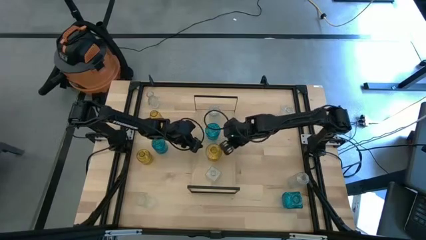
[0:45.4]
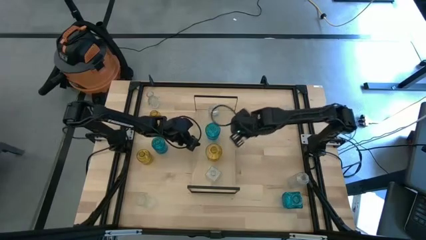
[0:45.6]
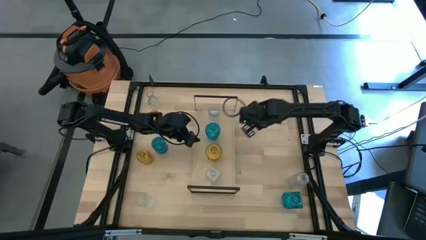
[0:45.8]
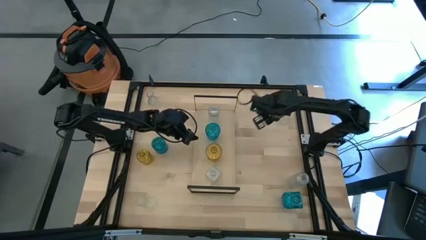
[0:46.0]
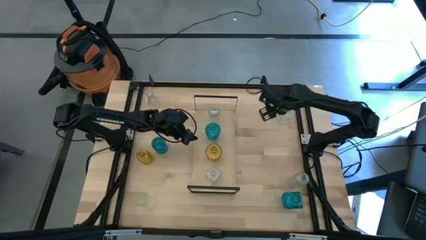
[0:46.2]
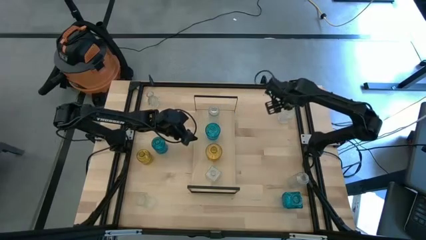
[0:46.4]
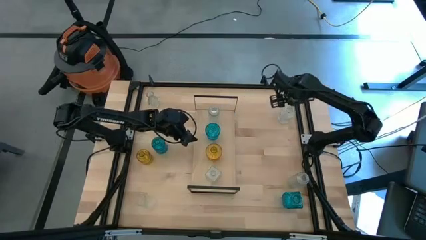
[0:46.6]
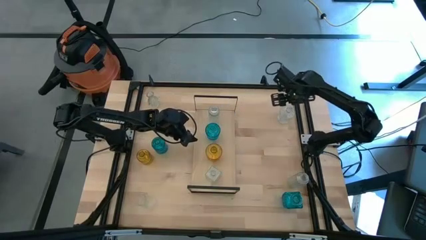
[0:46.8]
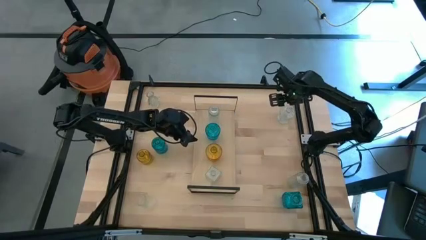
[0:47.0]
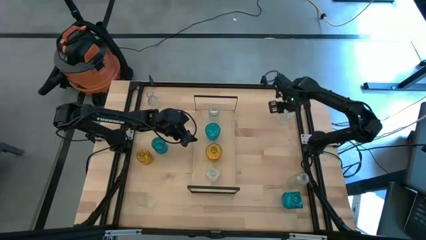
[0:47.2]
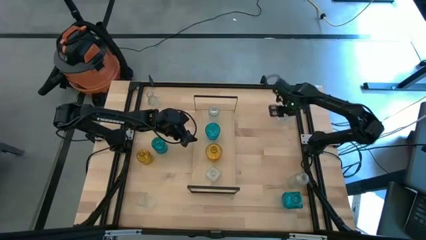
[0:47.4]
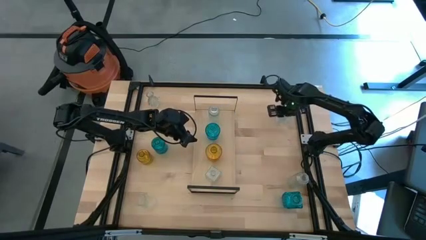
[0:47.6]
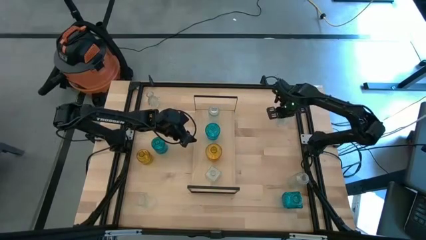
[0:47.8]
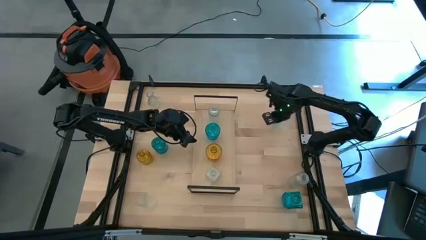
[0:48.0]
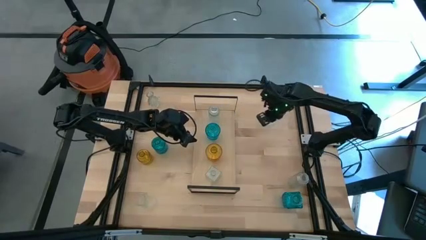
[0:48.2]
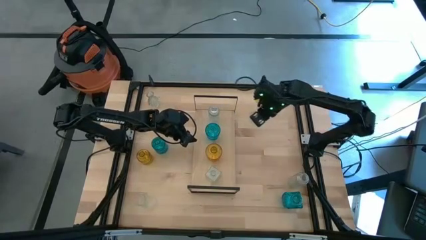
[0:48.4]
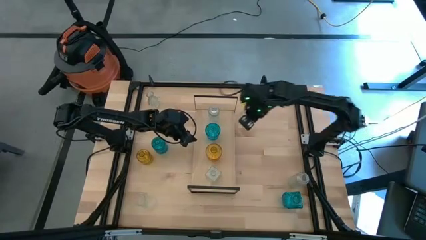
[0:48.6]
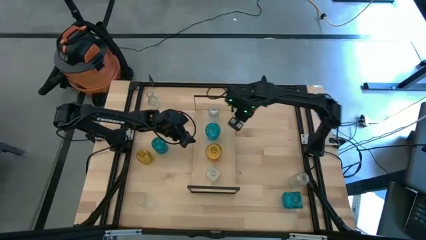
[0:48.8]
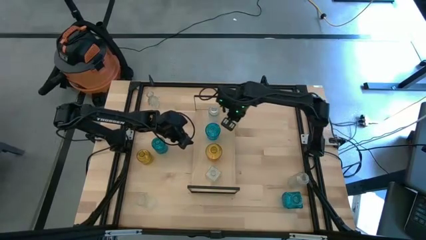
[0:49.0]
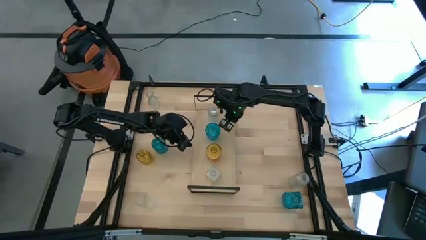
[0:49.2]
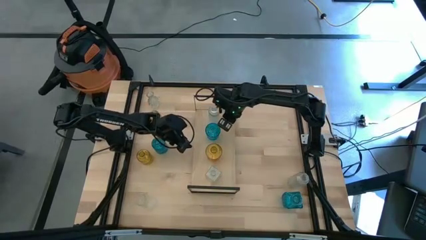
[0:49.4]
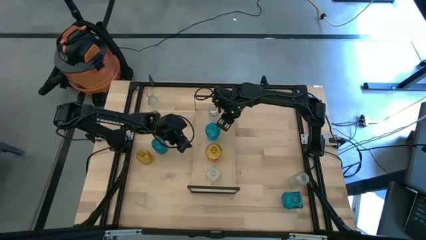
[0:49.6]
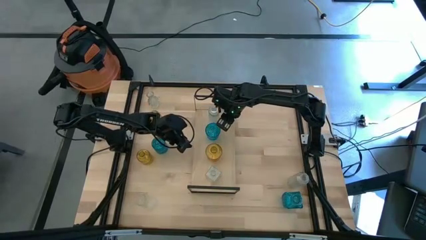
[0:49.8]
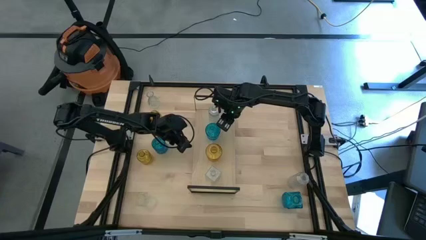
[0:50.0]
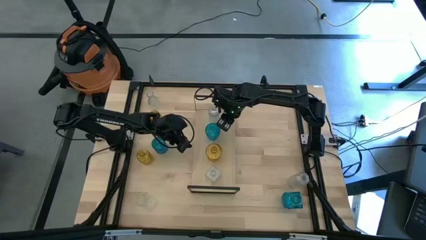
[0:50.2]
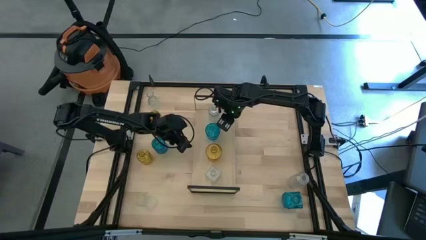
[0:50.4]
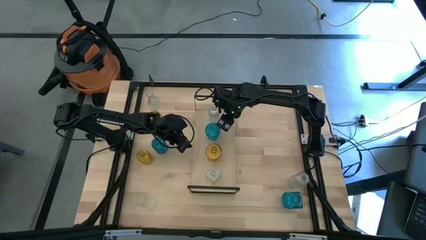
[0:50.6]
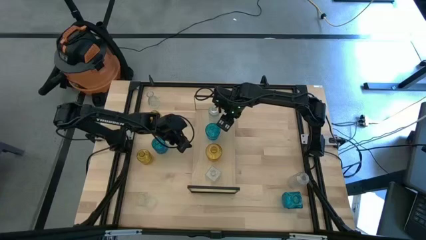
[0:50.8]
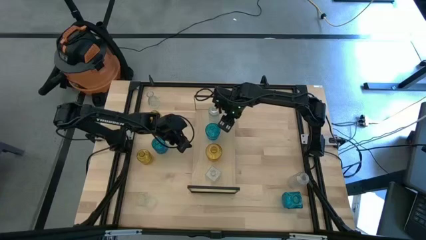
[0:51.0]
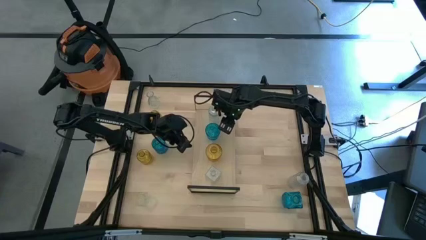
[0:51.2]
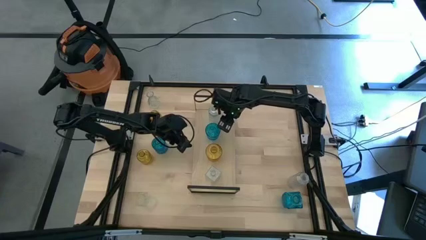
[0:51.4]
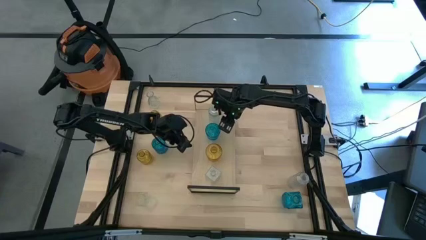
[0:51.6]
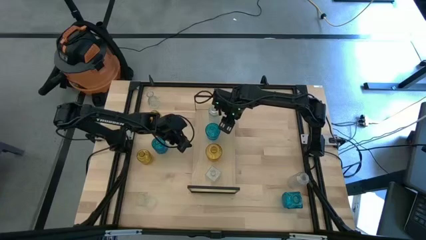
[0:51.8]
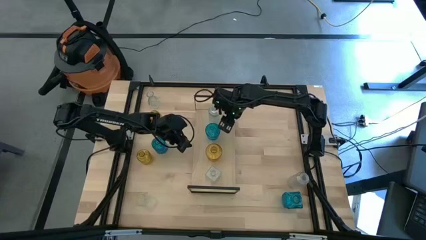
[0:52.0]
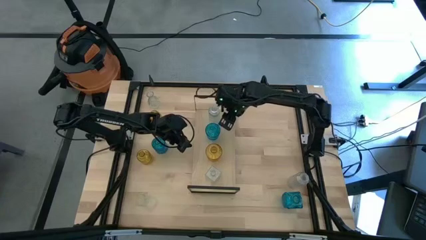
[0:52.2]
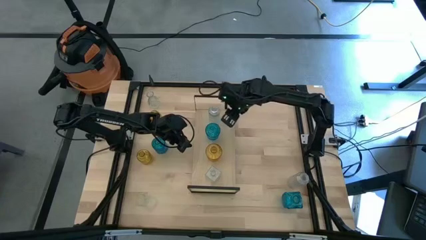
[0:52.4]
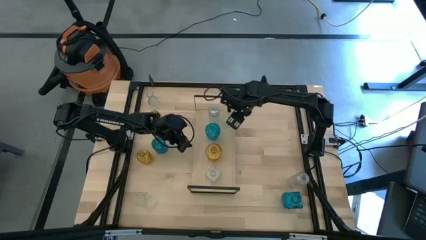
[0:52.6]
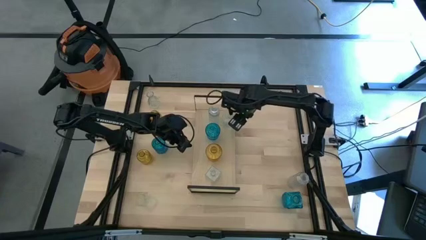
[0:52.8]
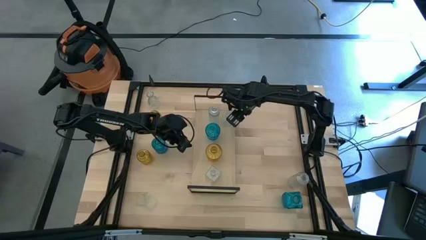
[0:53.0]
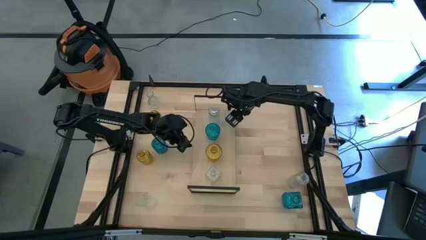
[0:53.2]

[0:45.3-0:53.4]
Task: sort vases onto shelf
Put the transparent vase on the shelf aligned with the other top transparent vase

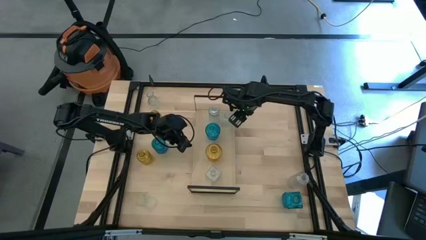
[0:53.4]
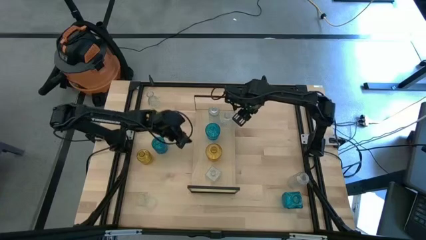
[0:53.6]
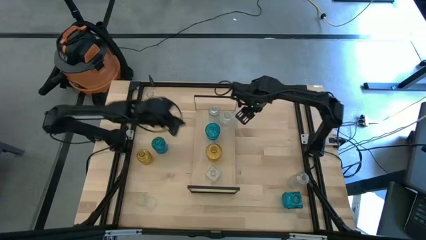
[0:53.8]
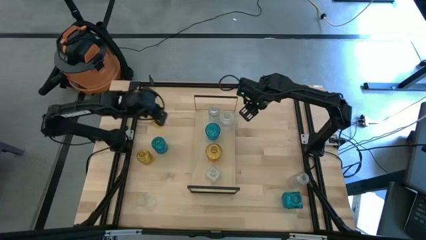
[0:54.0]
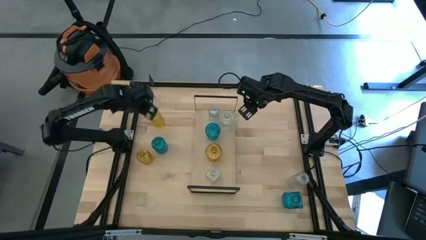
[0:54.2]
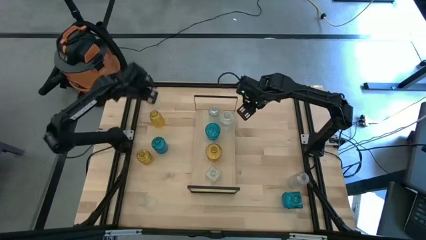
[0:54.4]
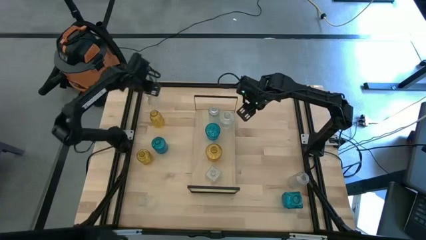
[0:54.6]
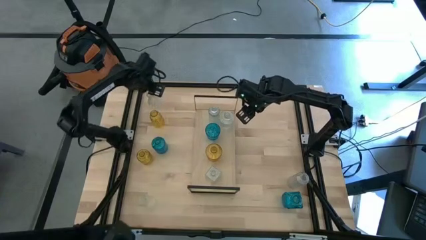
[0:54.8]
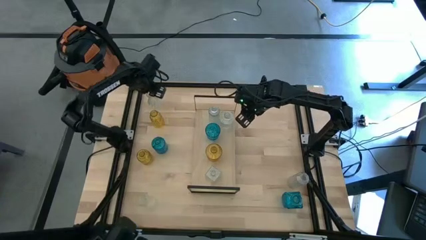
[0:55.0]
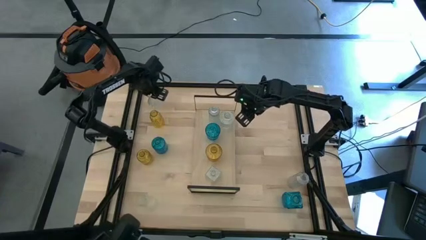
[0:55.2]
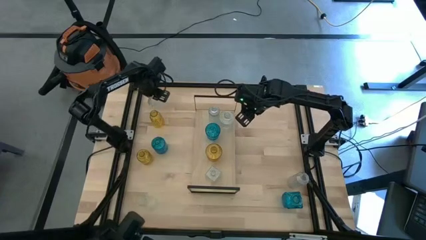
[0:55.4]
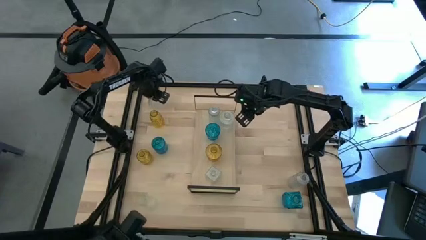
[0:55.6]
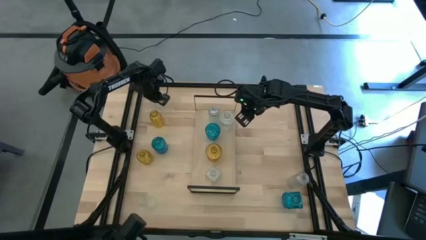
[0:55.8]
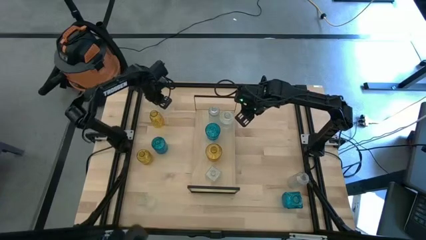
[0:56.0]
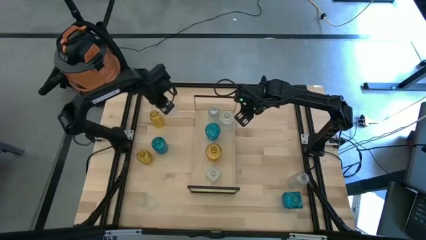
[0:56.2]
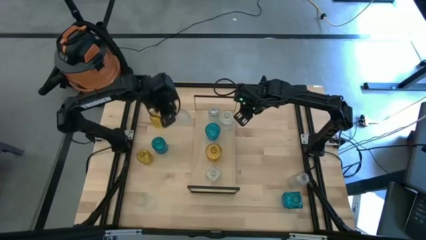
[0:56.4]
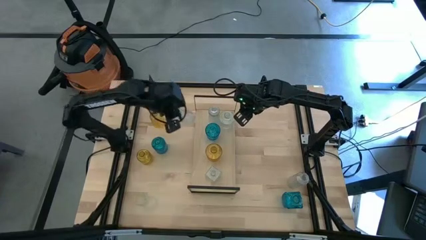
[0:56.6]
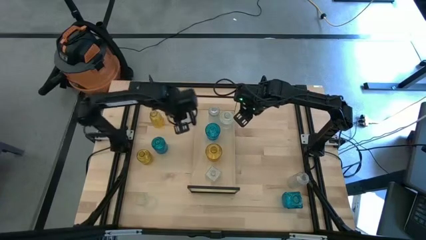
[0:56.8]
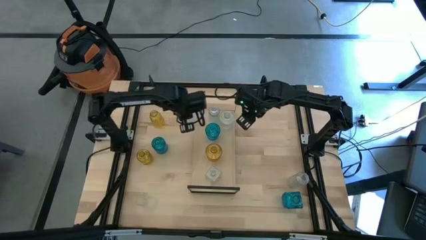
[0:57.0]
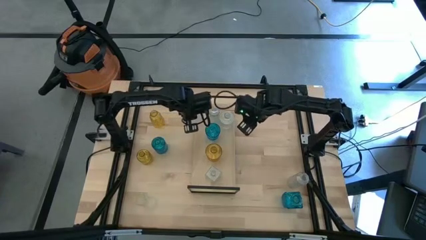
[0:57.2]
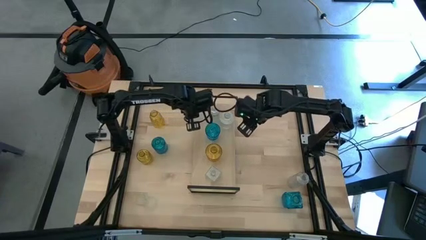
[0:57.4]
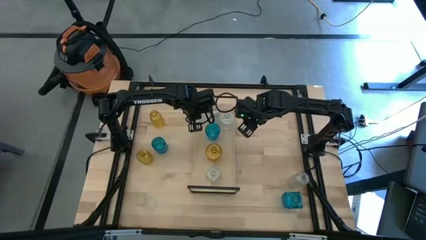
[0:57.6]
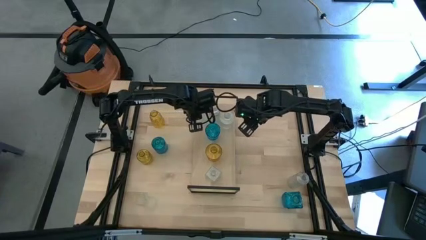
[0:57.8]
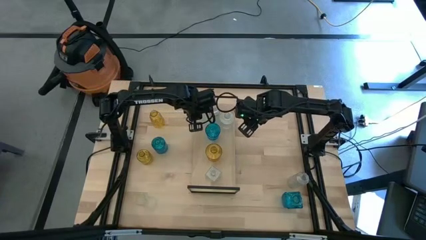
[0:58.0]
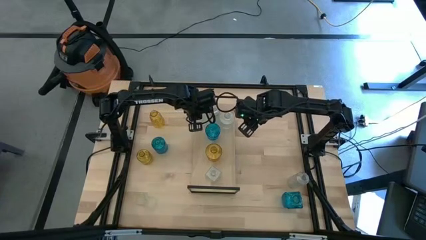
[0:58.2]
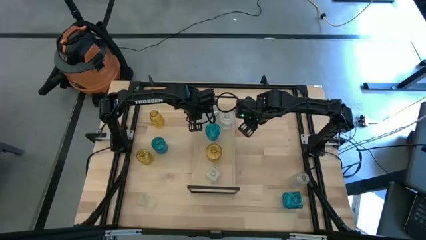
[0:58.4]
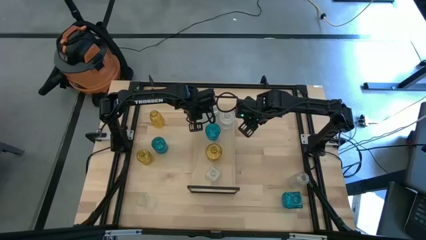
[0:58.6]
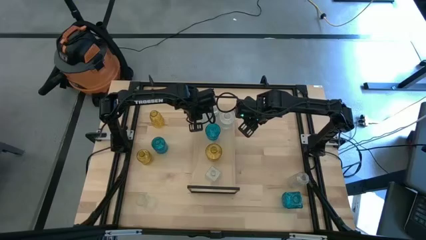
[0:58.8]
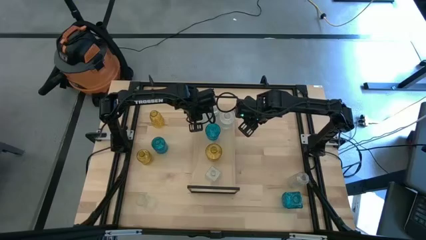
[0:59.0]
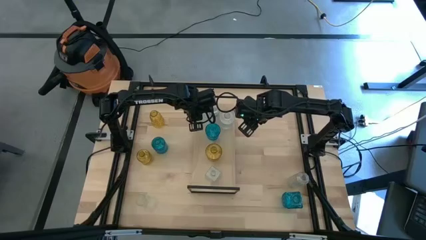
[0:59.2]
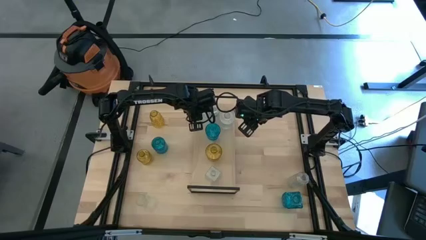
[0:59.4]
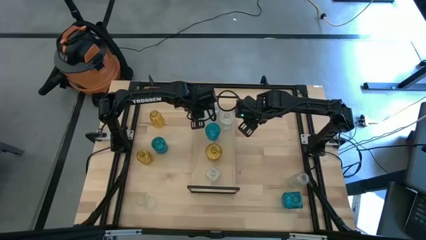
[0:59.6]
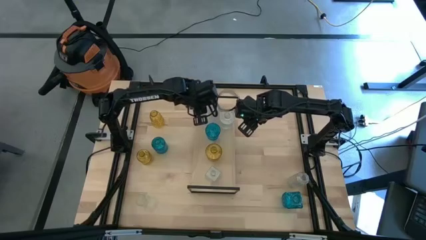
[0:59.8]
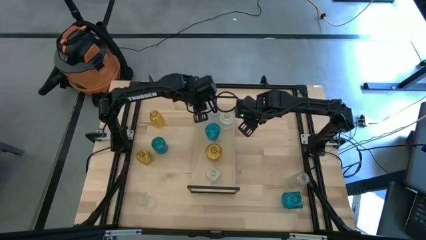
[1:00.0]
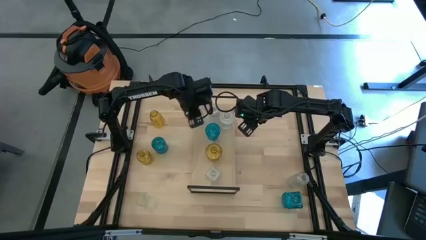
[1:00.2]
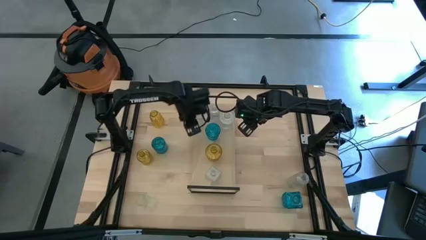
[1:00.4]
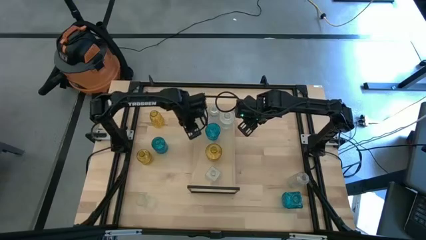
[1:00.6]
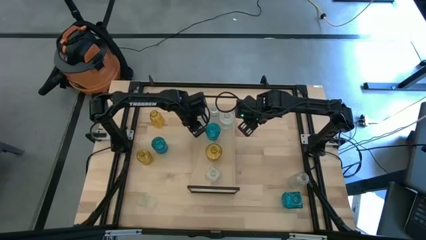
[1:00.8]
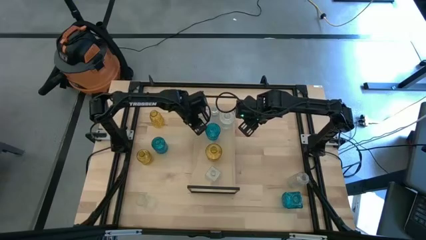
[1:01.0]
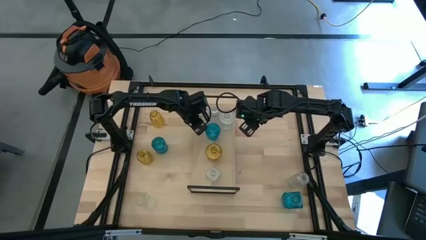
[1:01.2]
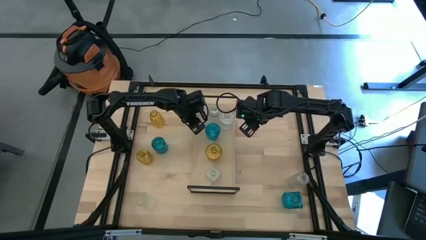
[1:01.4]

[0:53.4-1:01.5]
Put the transparent vase on the shelf aligned with the other top transparent vase
